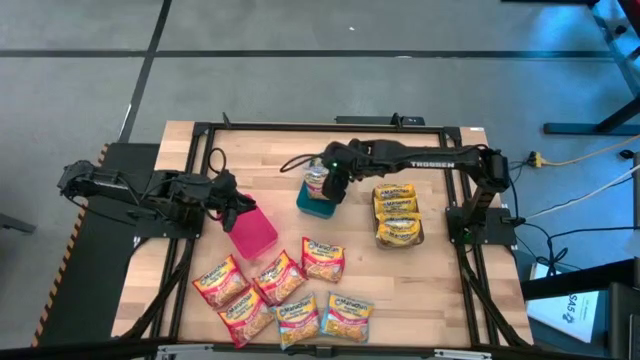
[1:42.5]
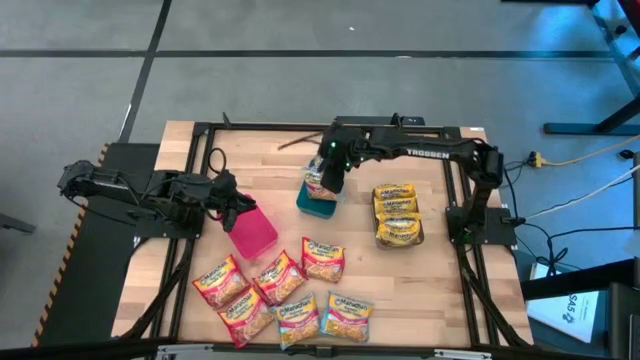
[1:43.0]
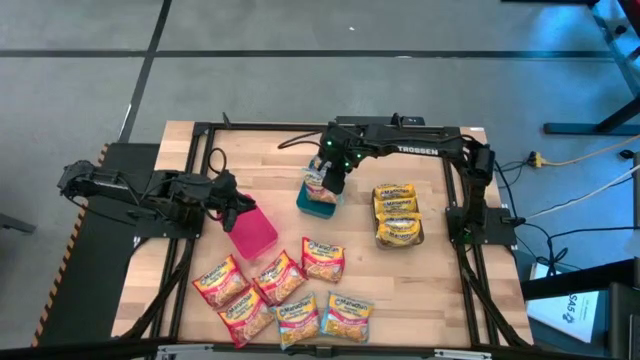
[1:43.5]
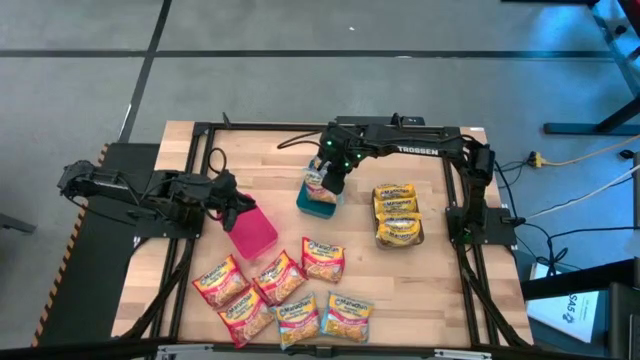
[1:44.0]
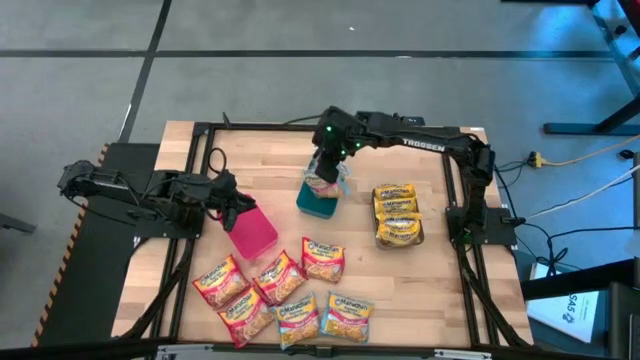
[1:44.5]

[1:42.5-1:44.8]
Task: Sort Maruchan noodles
Put the blue noodle pack into the blue bin

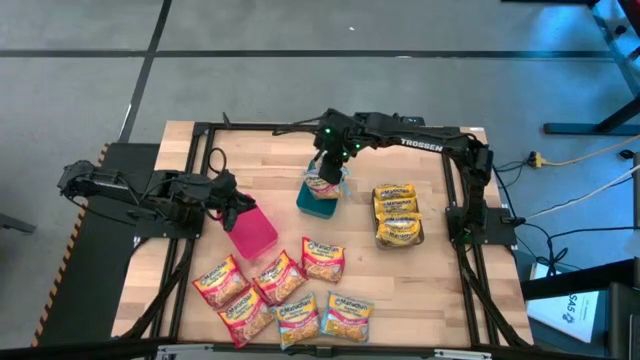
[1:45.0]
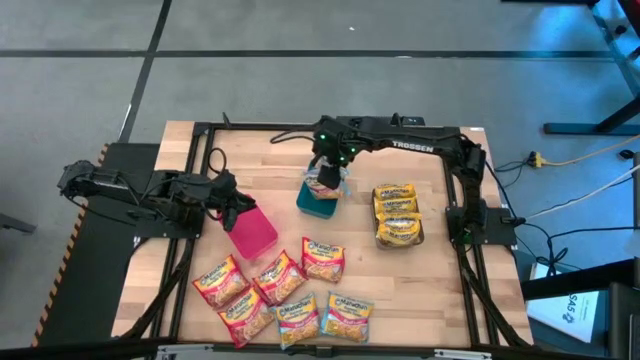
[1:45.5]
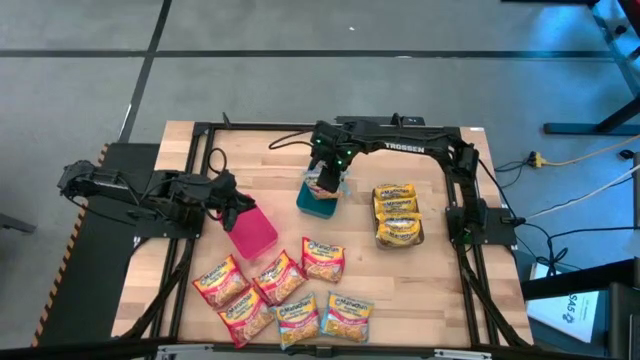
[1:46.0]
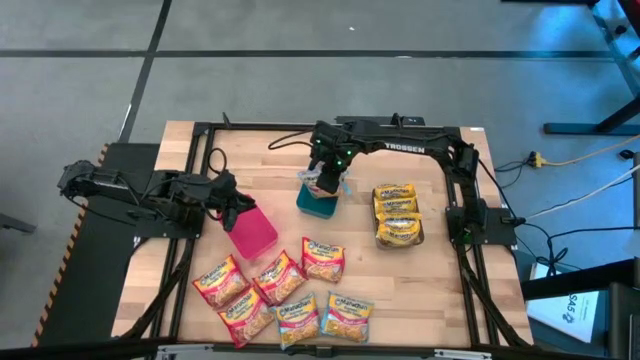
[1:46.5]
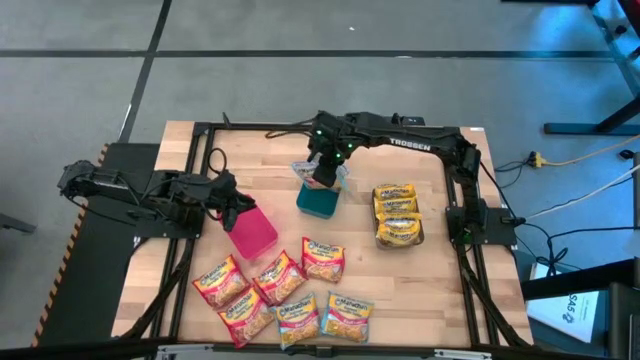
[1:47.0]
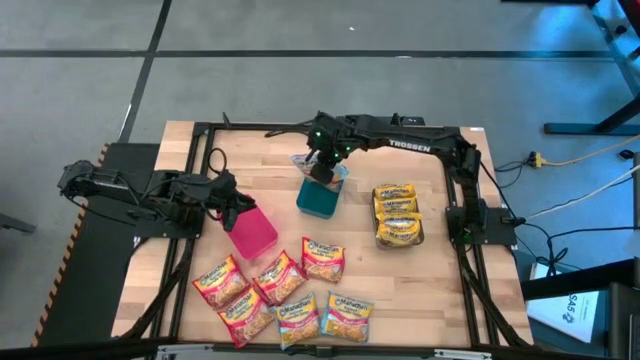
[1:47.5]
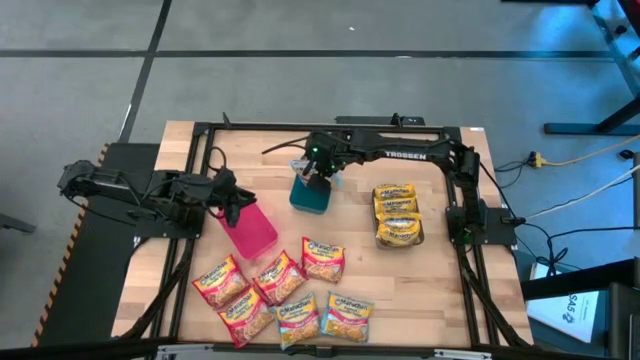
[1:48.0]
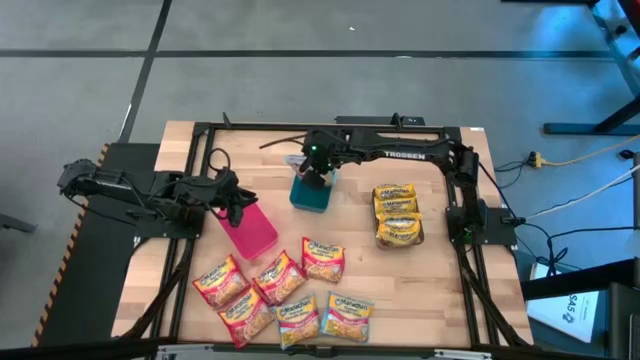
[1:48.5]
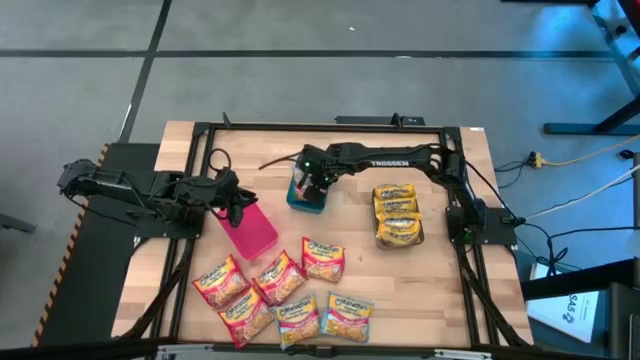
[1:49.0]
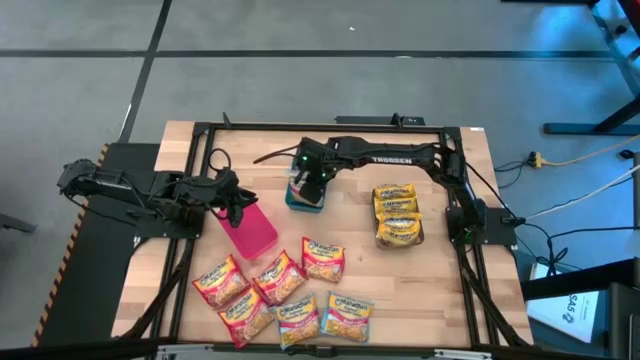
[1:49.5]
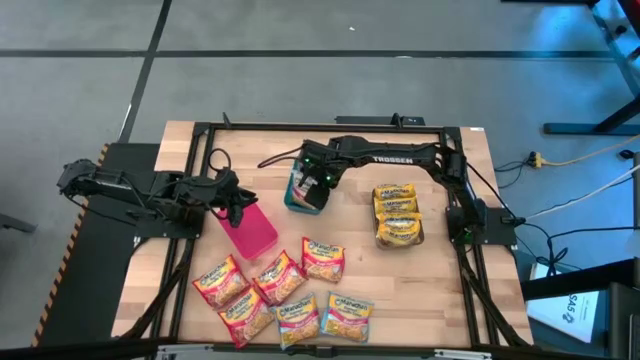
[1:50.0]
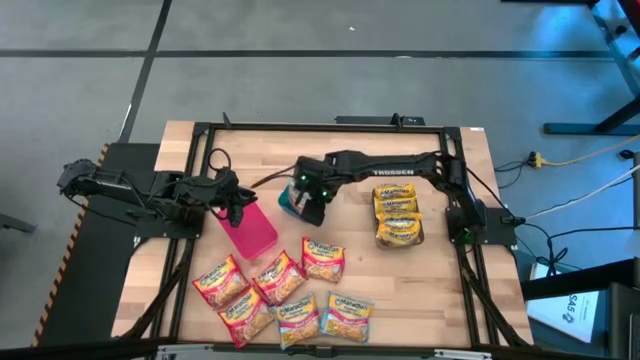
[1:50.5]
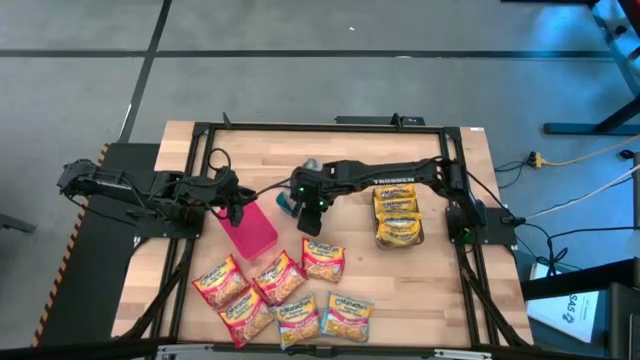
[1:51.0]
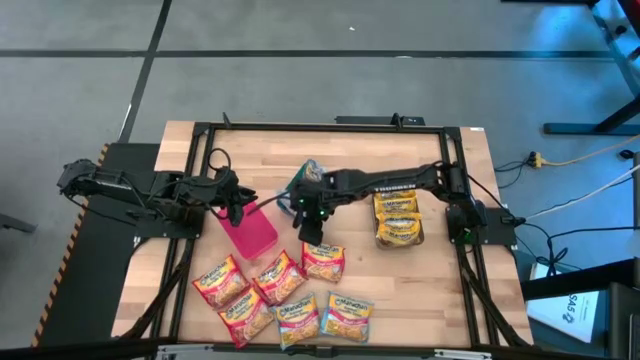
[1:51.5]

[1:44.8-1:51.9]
Put the blue noodle pack into the blue bin

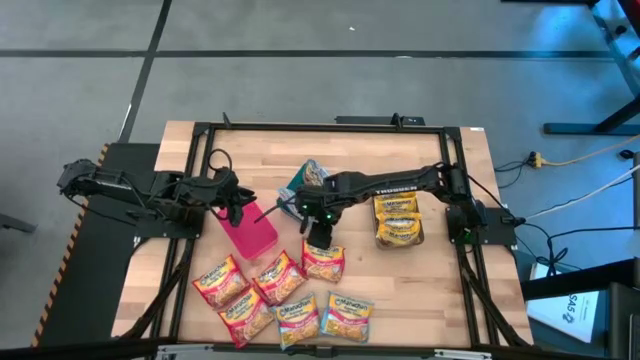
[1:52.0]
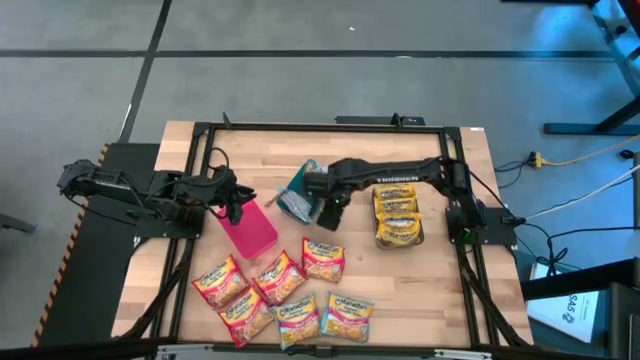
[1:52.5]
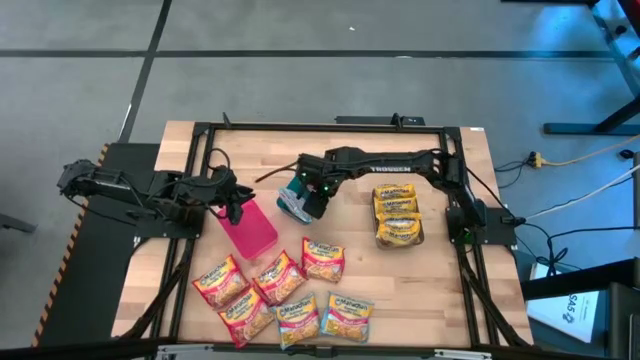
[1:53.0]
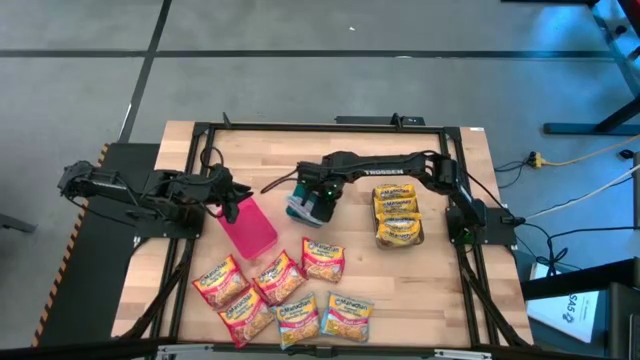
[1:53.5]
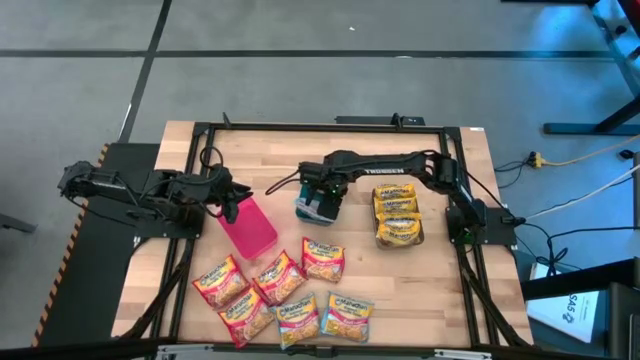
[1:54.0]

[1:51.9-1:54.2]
Adjust the blue bin on the table

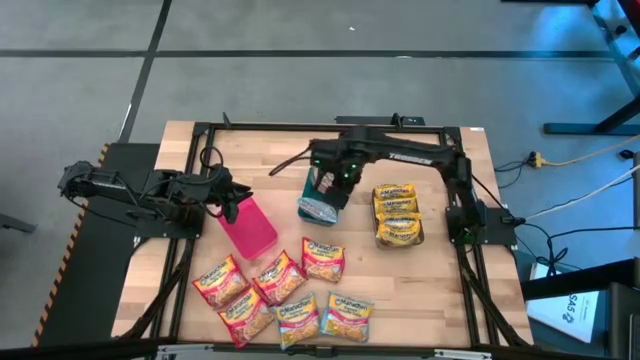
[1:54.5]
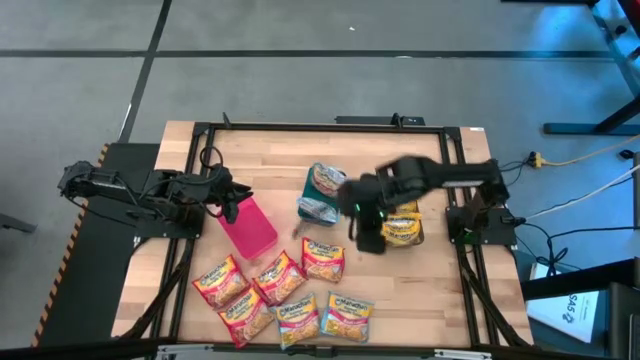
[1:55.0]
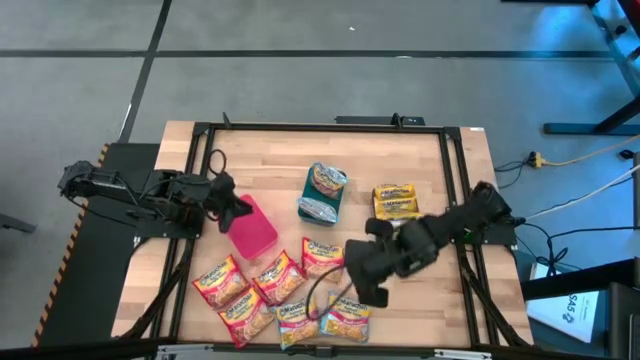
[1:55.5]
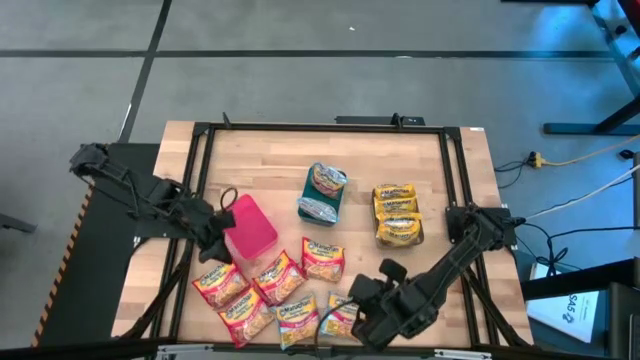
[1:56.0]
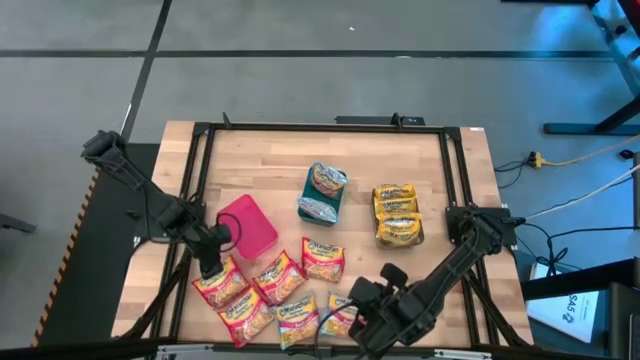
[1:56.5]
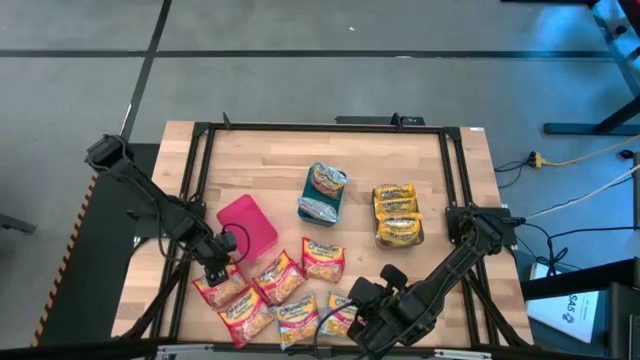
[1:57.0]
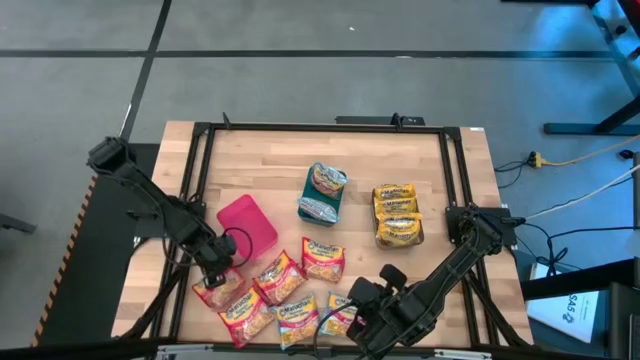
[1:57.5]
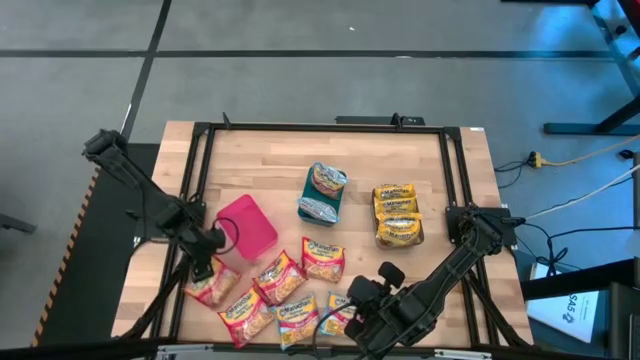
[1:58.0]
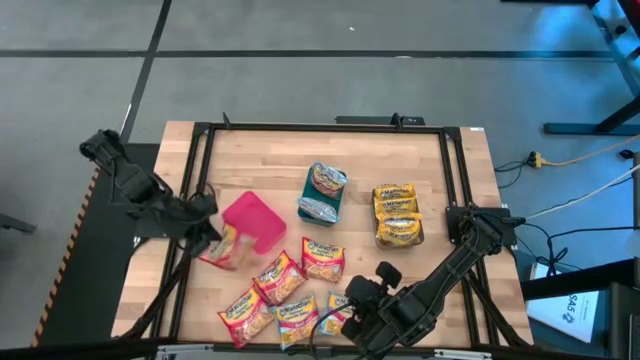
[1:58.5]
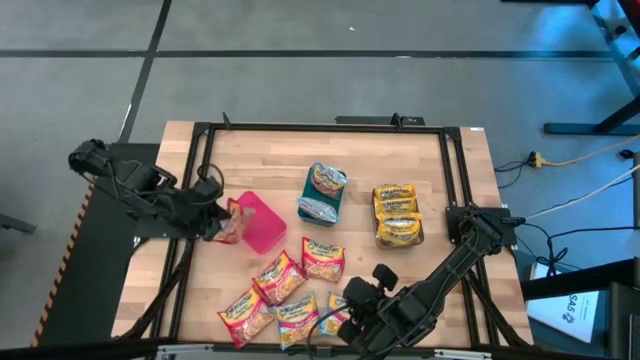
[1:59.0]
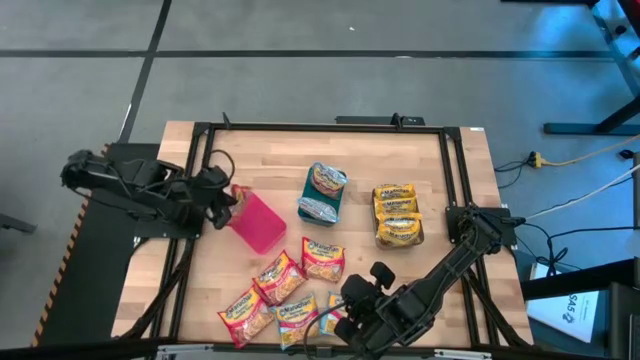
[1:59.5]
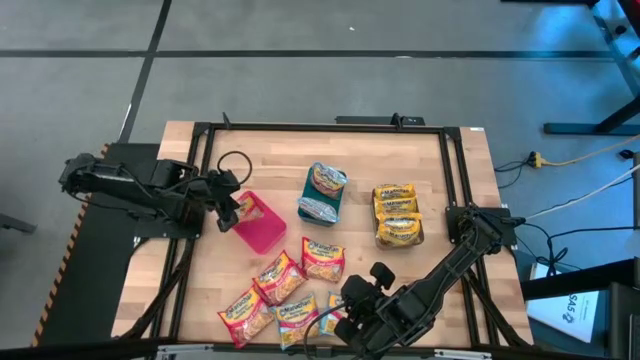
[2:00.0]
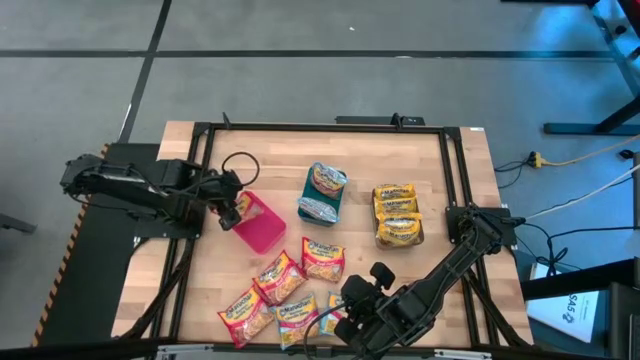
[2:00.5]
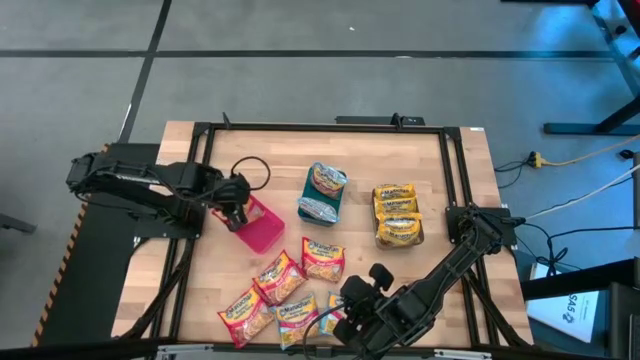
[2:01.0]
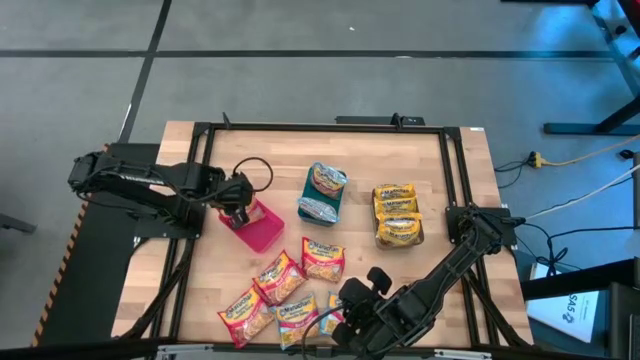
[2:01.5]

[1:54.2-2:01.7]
Put the red noodle pack into the red bin
